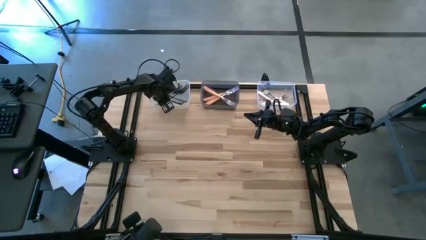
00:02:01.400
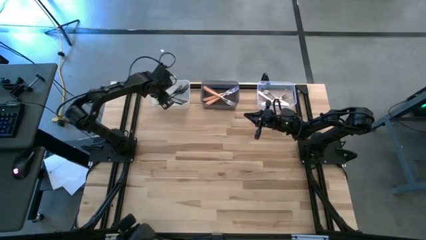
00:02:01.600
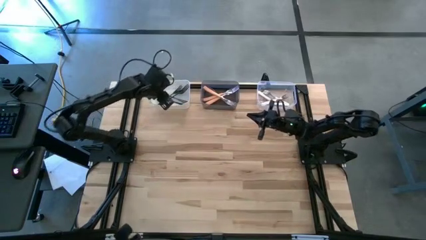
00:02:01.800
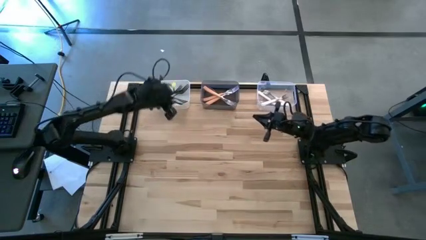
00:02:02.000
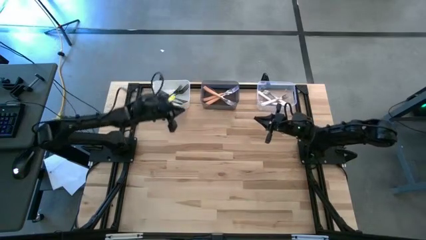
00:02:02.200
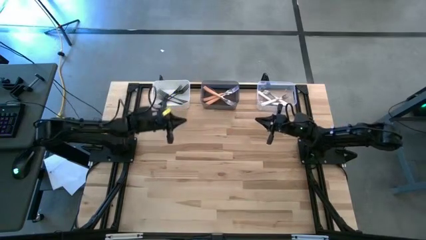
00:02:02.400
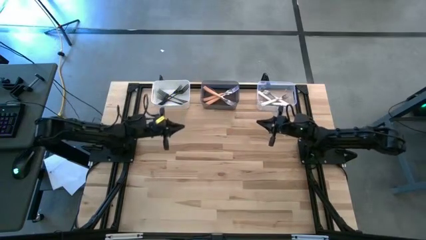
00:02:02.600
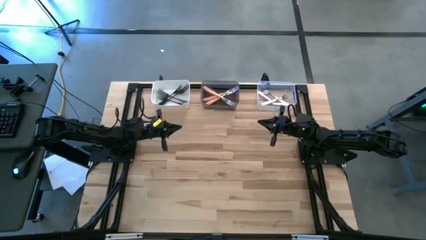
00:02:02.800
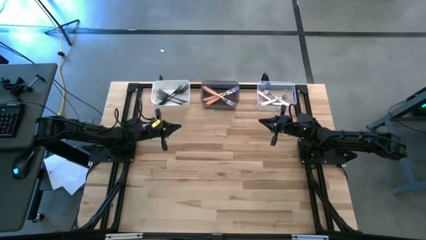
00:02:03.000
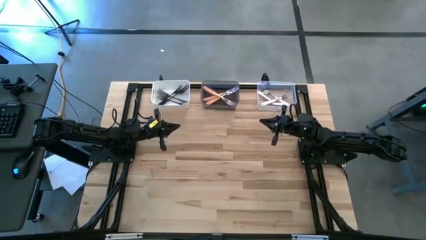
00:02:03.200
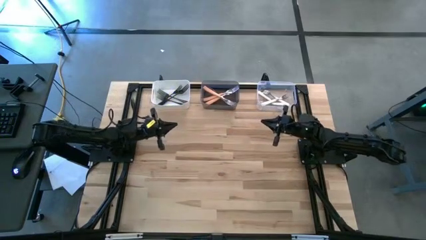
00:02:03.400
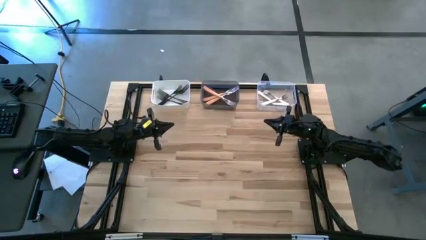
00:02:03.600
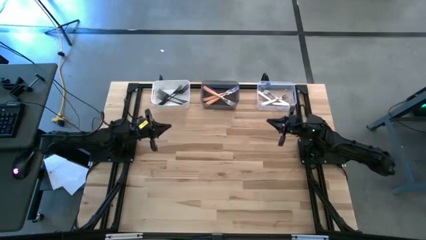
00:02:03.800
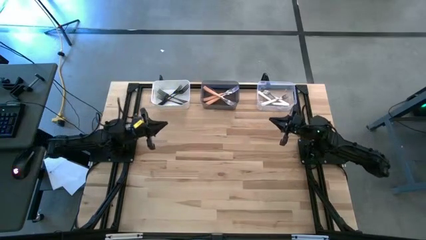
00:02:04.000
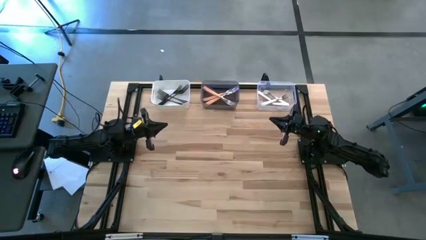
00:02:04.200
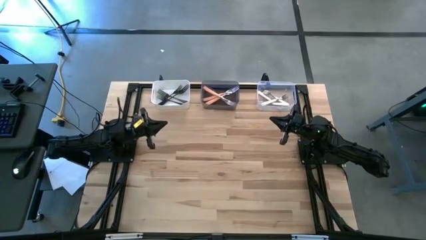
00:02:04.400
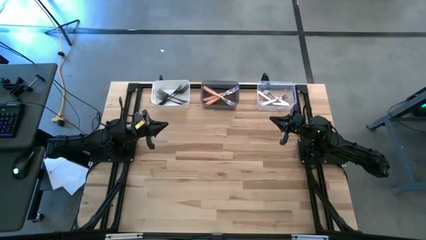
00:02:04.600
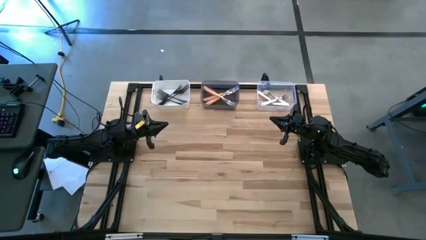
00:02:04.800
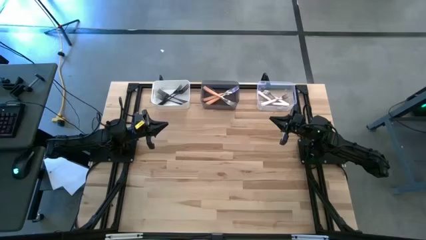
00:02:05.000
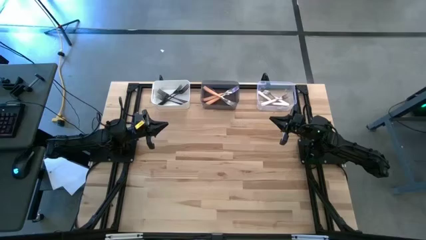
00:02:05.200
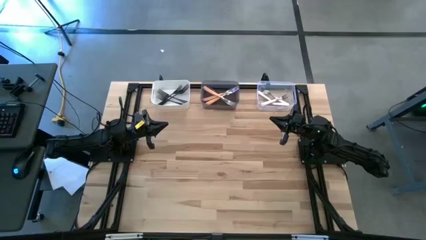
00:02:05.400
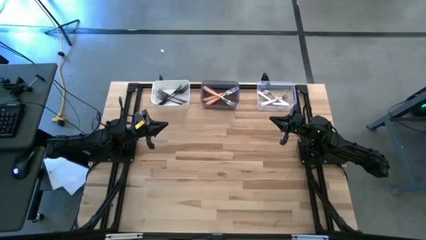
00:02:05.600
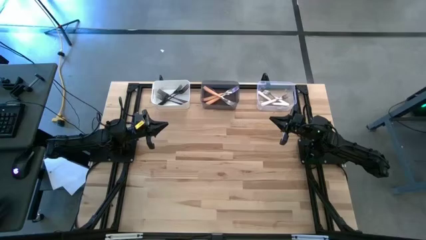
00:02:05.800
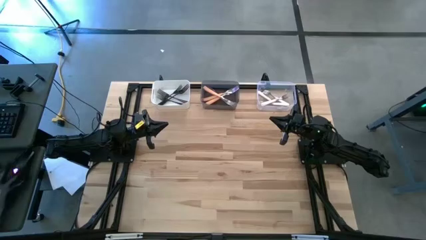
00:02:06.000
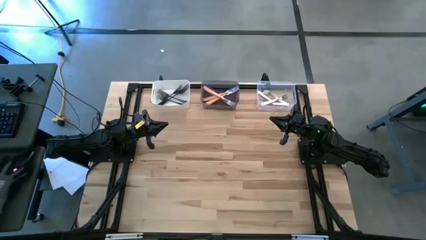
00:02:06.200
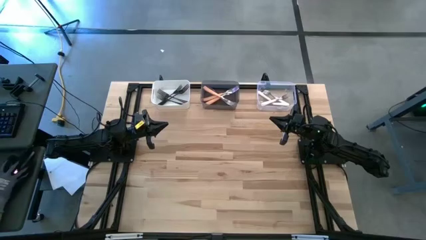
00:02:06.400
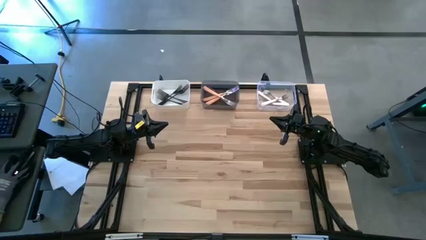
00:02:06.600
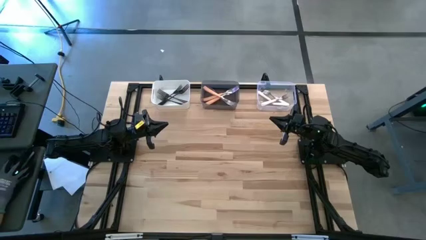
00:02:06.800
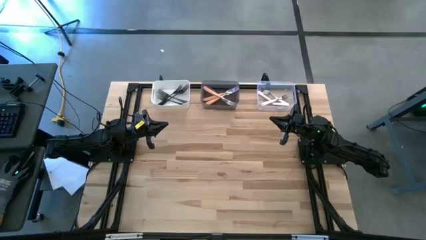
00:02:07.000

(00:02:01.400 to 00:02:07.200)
Task: Sort silverware by color (type)
Return to Home Position

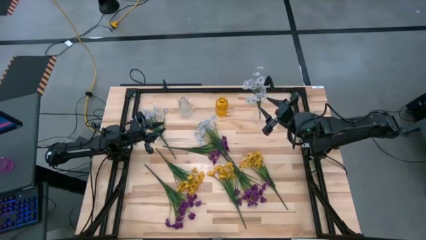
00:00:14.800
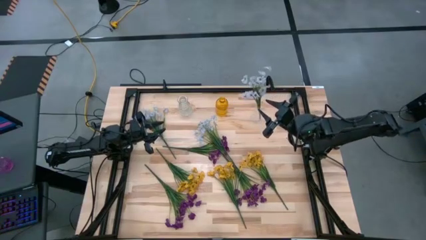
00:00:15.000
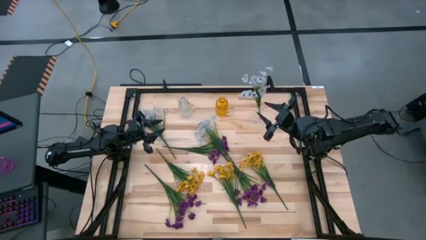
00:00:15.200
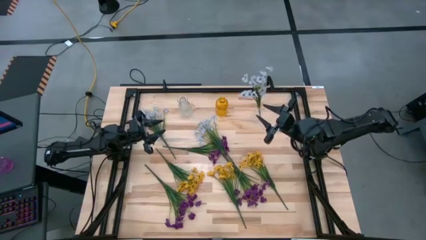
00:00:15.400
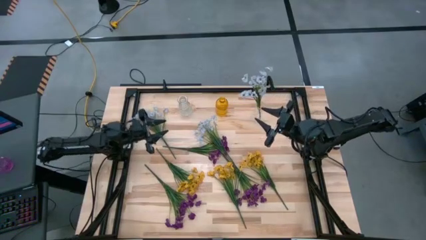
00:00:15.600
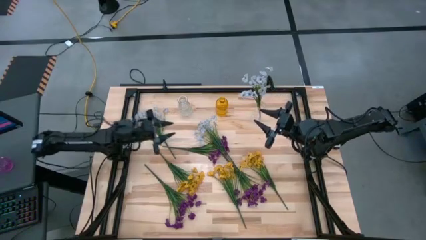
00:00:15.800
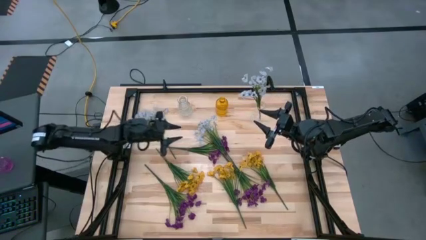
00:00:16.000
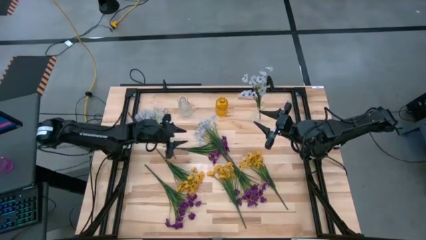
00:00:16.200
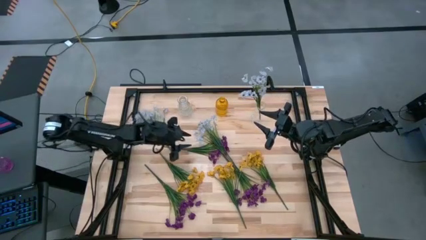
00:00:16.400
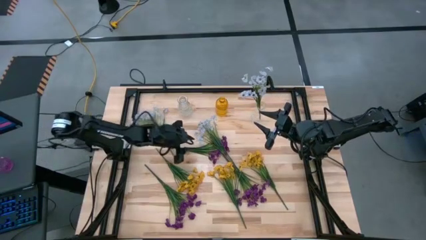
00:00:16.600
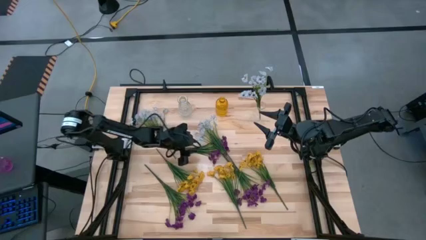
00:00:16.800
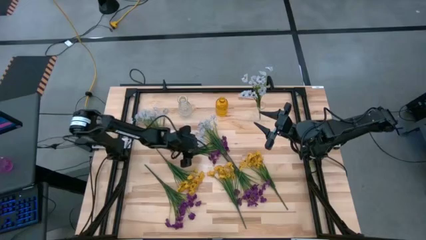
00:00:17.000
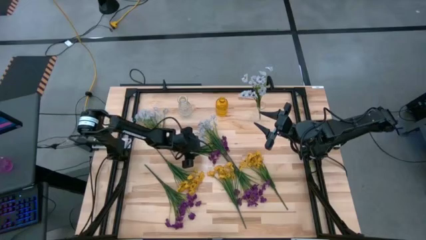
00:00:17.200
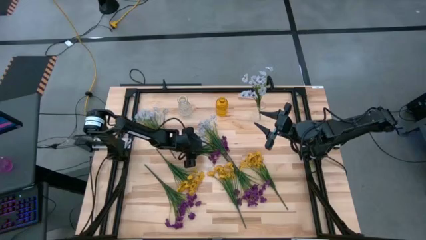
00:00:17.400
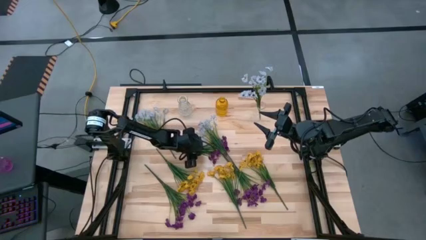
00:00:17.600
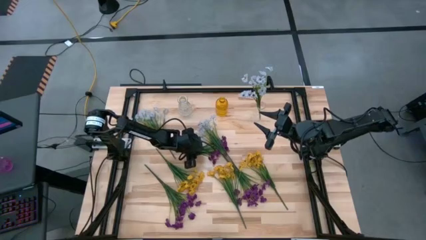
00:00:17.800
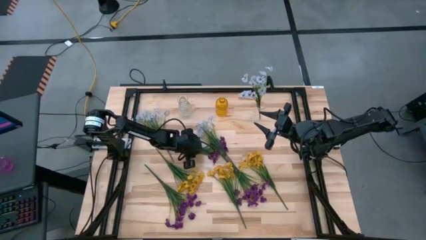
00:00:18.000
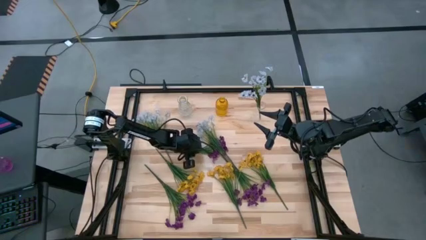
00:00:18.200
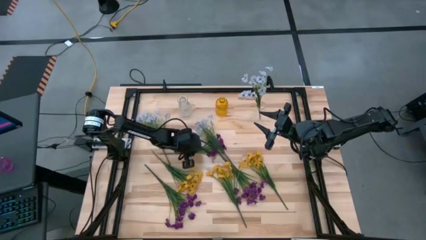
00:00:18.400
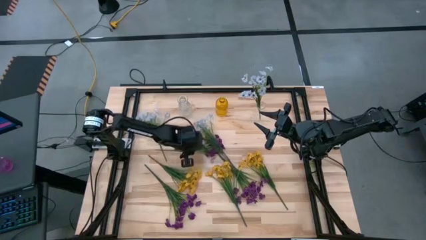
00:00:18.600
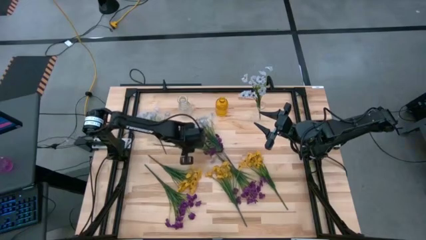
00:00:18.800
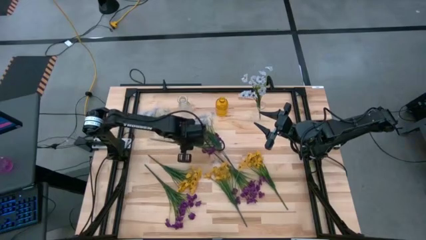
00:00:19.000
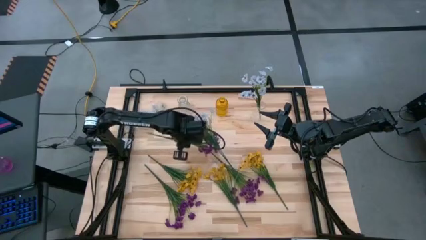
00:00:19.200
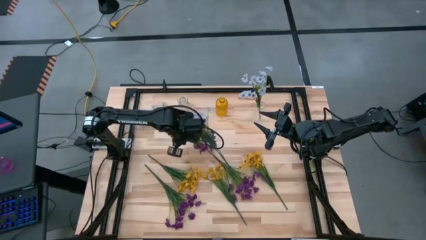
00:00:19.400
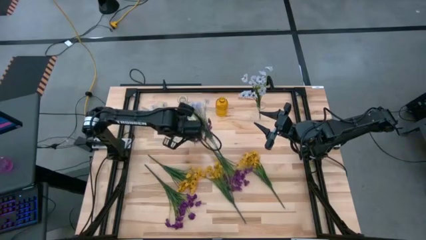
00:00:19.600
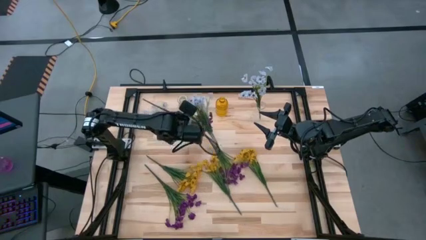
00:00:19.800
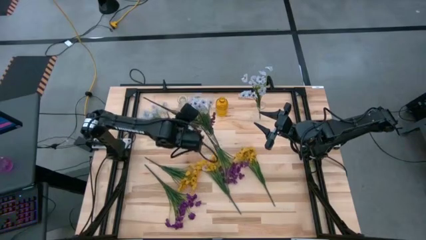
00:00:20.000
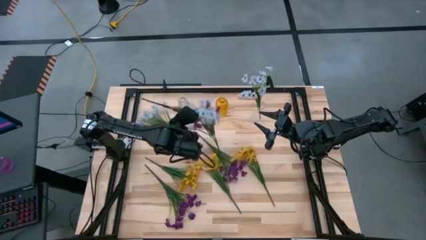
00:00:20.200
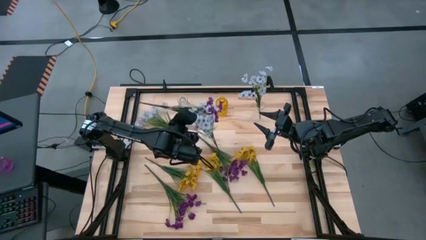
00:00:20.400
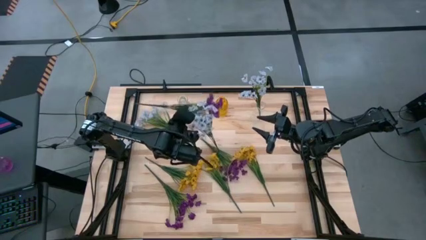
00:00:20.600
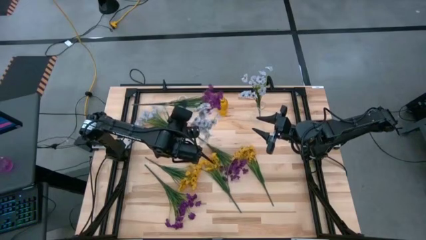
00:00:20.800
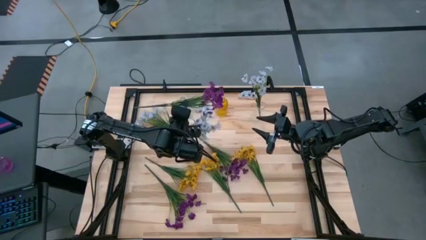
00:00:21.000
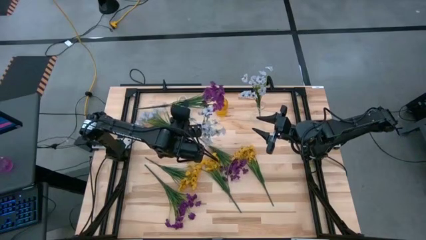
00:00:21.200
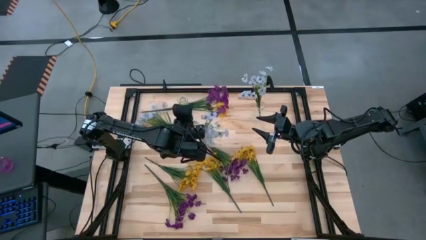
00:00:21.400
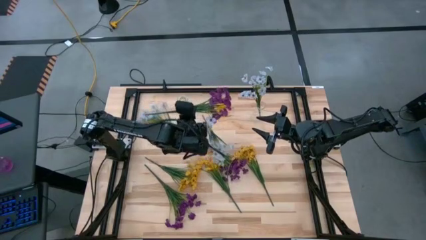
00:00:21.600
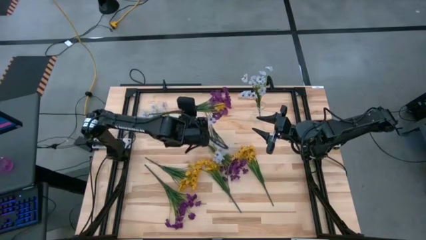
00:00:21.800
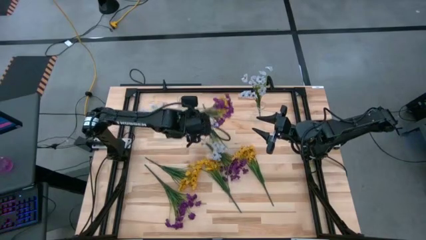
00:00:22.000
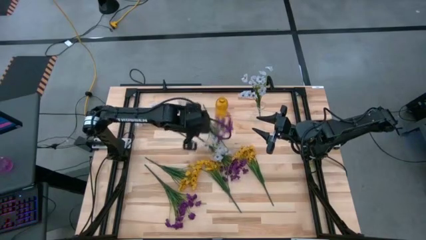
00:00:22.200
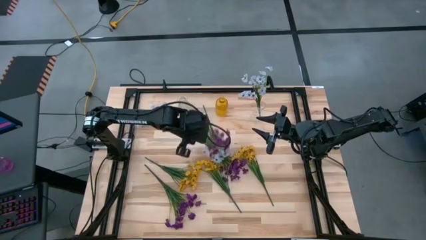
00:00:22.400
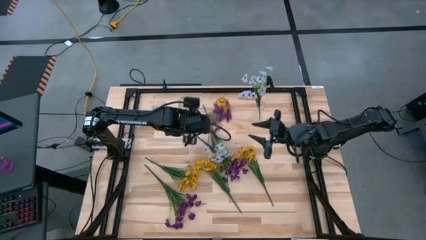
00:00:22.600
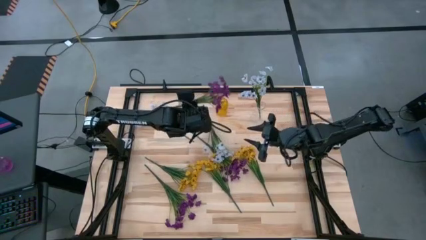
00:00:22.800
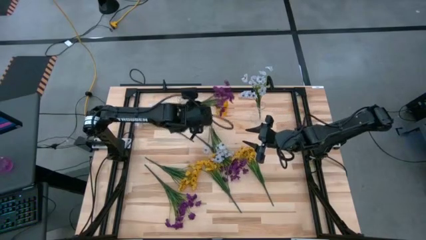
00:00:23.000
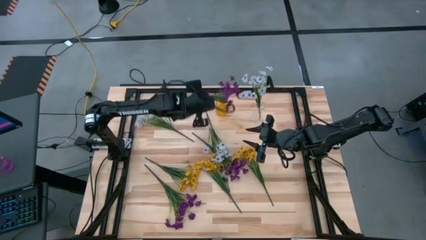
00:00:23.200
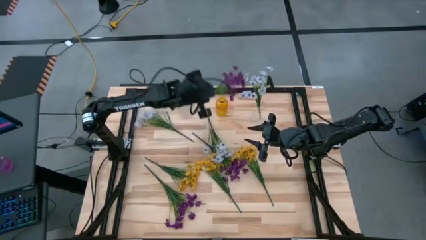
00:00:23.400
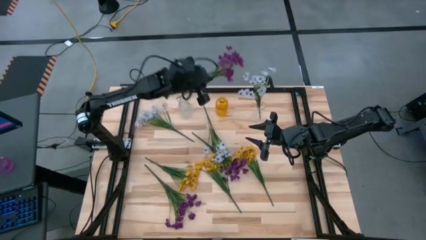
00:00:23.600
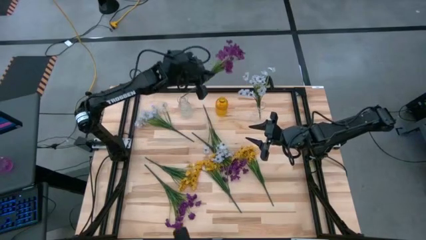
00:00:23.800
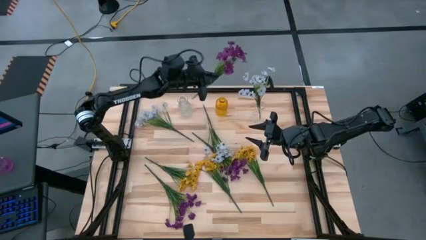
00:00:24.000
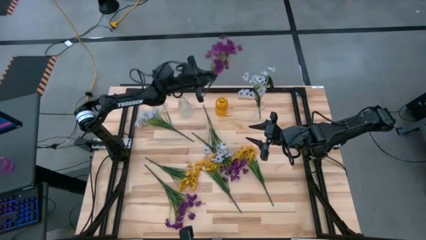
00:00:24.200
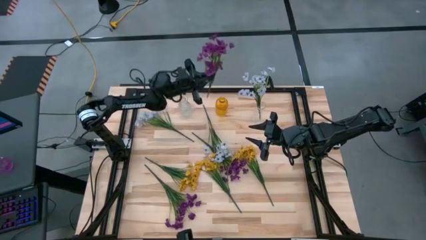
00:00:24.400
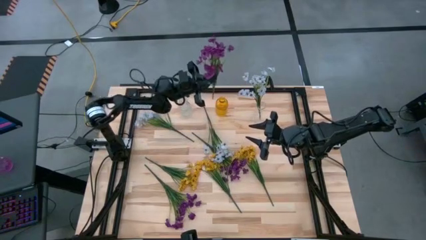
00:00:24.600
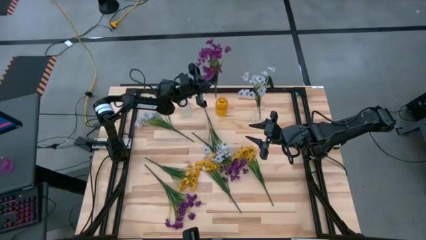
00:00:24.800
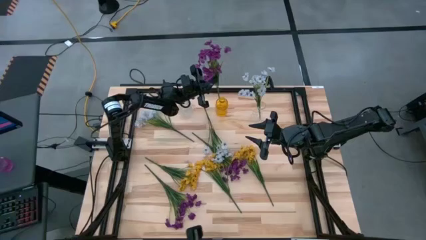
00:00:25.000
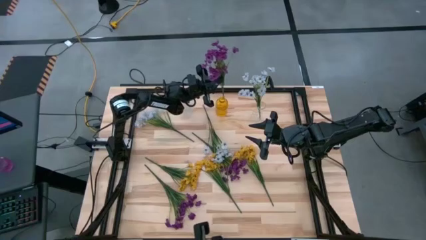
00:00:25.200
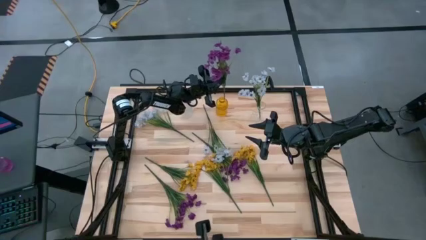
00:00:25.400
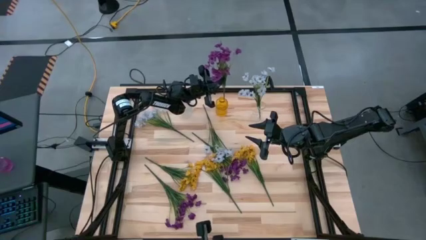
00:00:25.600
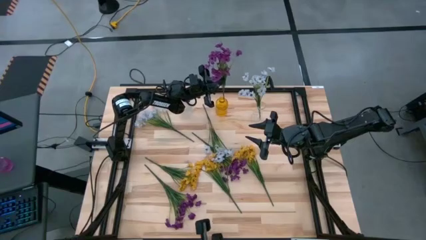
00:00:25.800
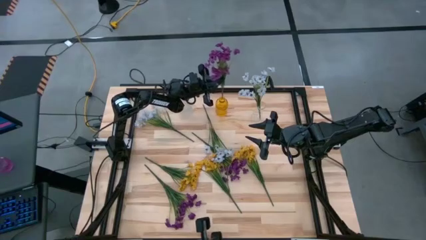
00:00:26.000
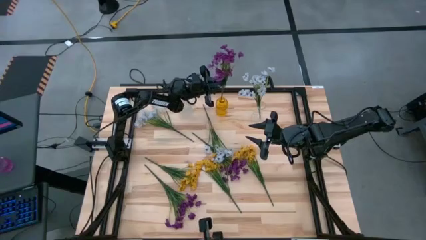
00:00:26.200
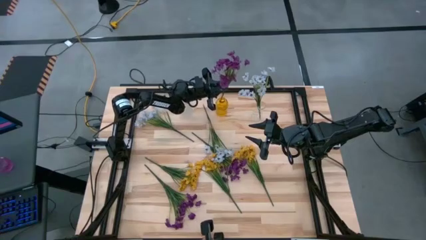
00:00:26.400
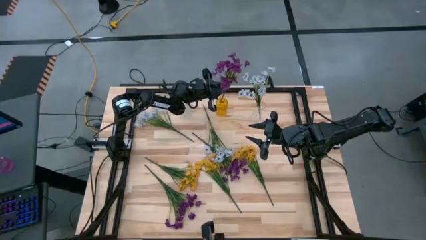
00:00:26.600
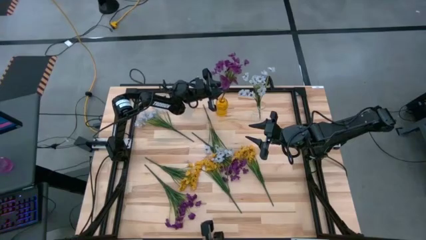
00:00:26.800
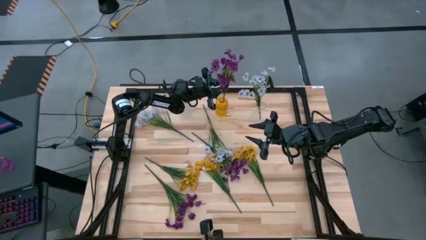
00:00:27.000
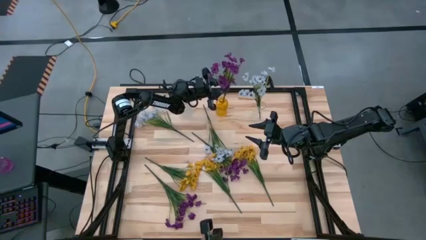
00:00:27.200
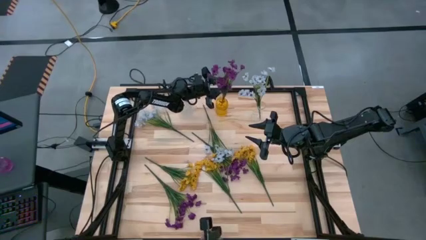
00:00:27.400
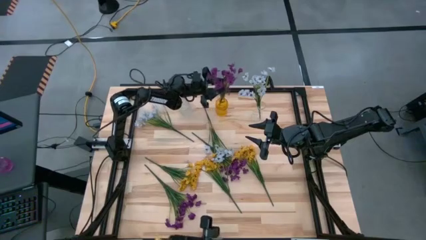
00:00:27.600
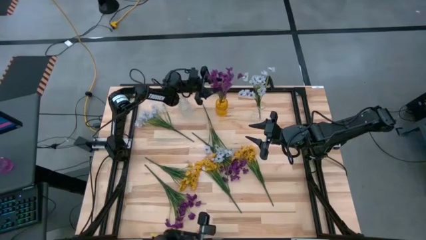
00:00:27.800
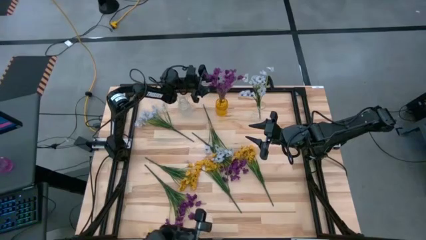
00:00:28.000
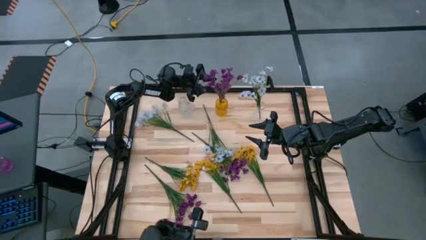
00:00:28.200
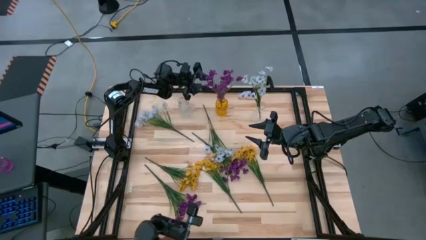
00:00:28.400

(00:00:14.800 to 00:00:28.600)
Task: Sort flowers into vase by color
Put the top purple flowers into the yellow vase
